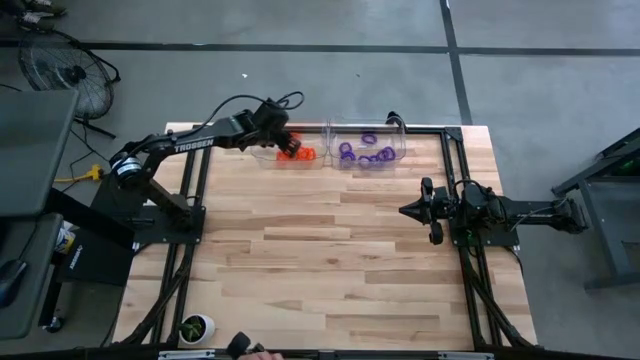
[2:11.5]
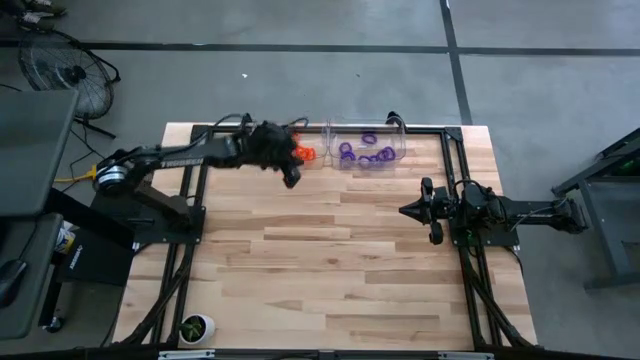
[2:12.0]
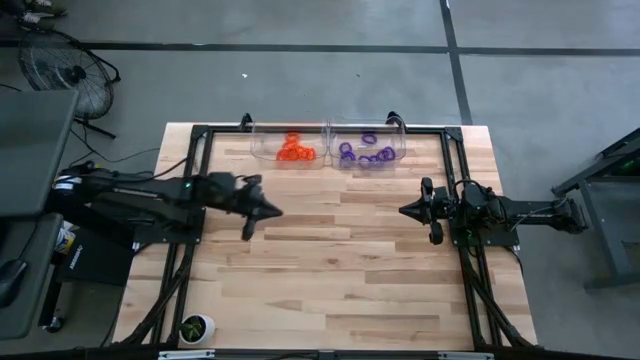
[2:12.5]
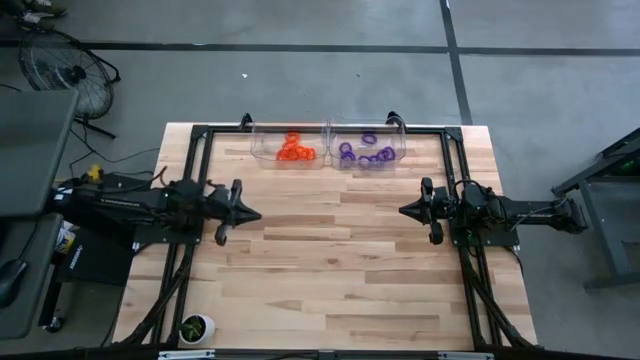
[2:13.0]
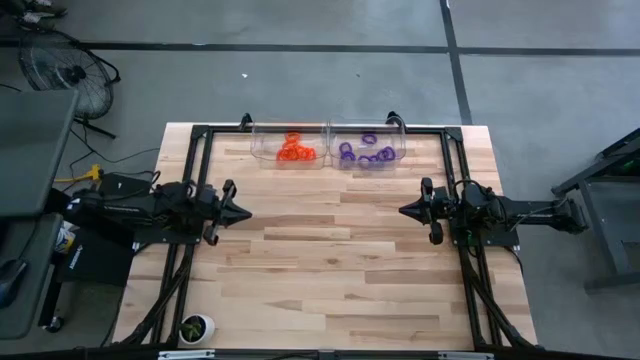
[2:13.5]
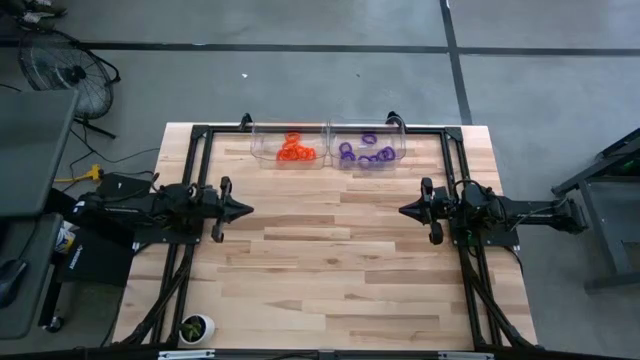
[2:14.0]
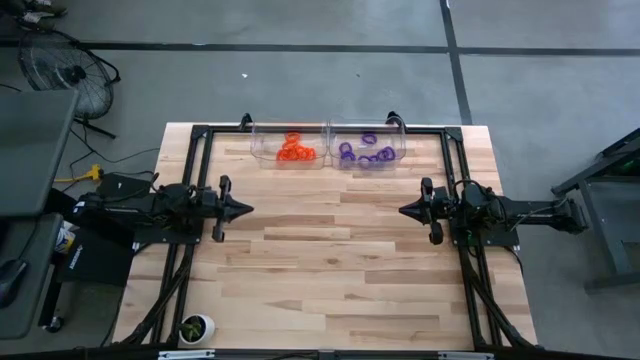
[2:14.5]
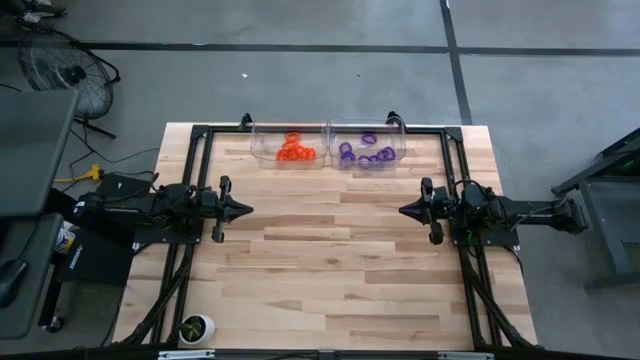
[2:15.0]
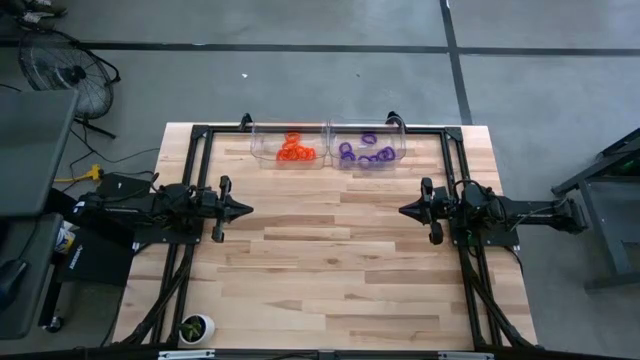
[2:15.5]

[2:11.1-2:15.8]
Task: Sort spring keychains
Return to Home Position

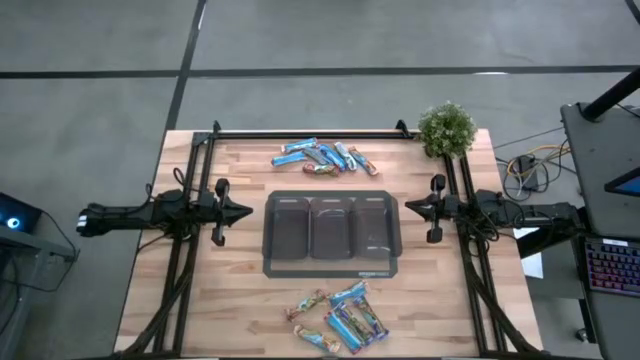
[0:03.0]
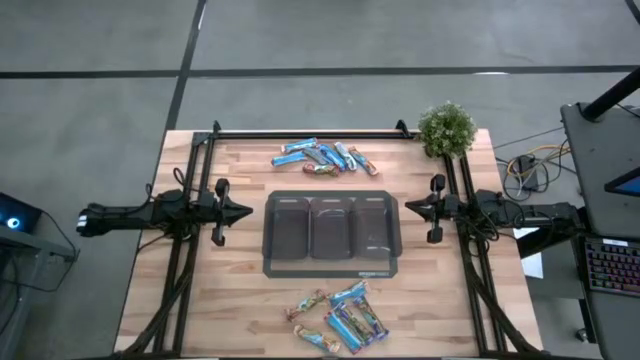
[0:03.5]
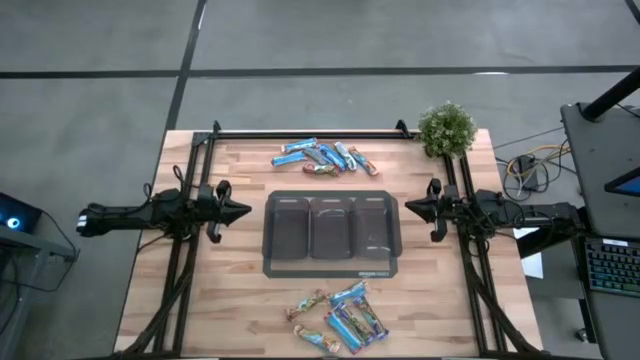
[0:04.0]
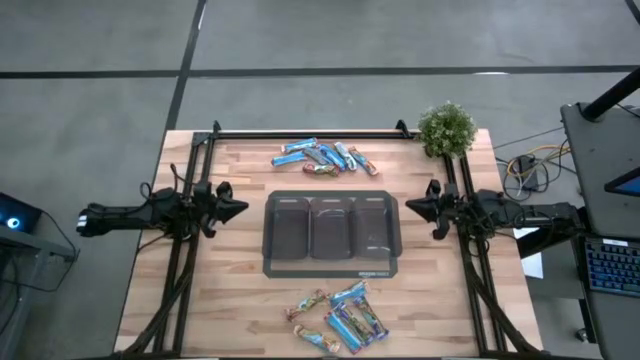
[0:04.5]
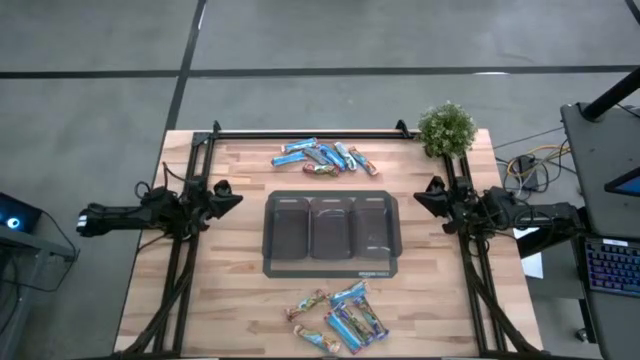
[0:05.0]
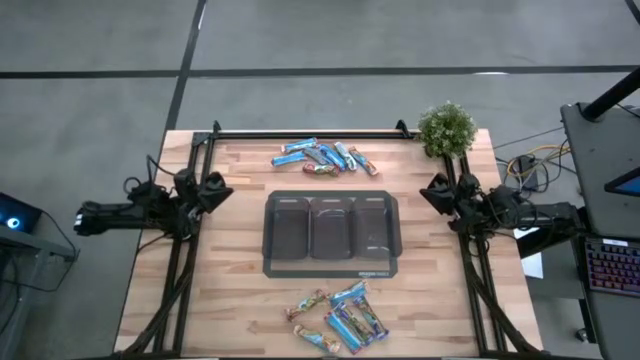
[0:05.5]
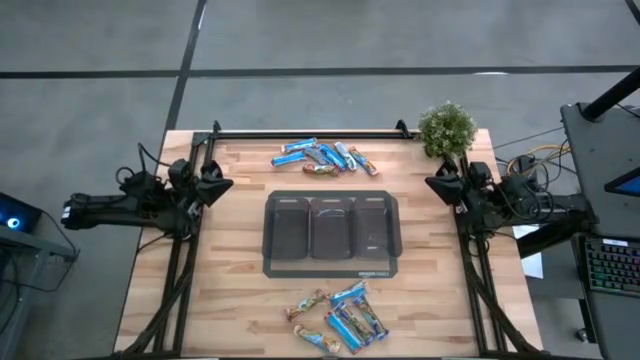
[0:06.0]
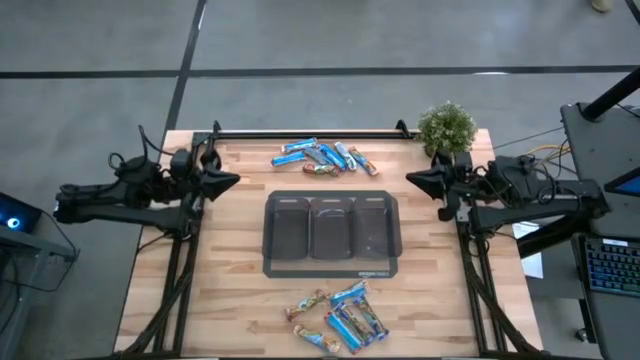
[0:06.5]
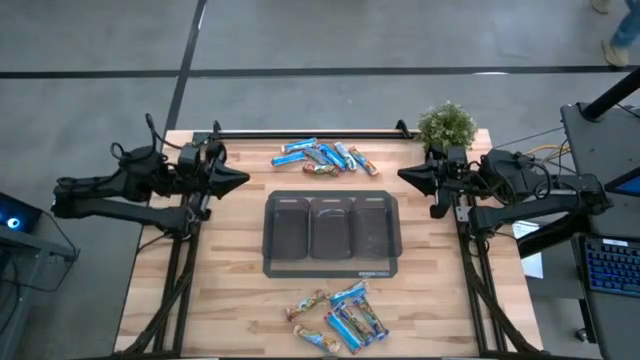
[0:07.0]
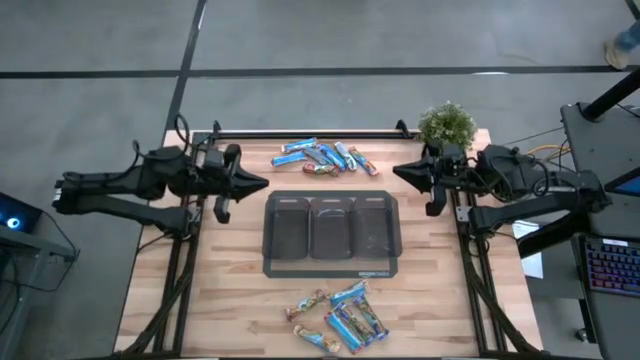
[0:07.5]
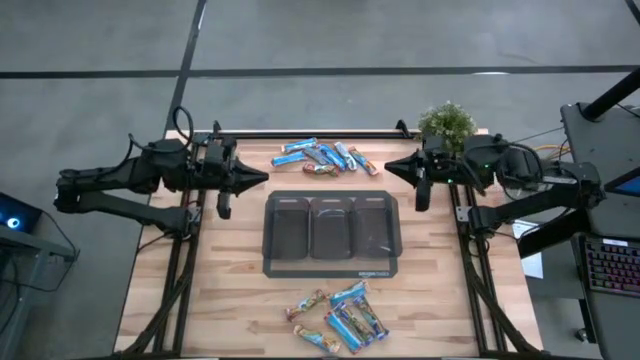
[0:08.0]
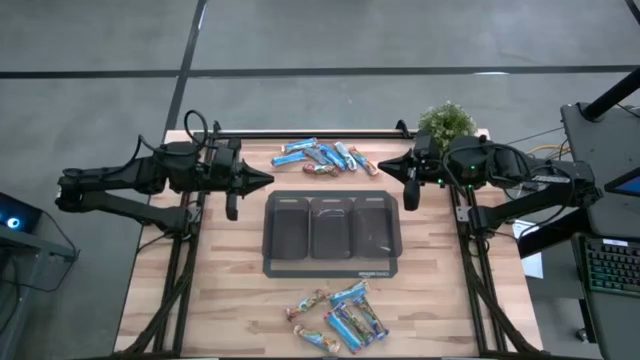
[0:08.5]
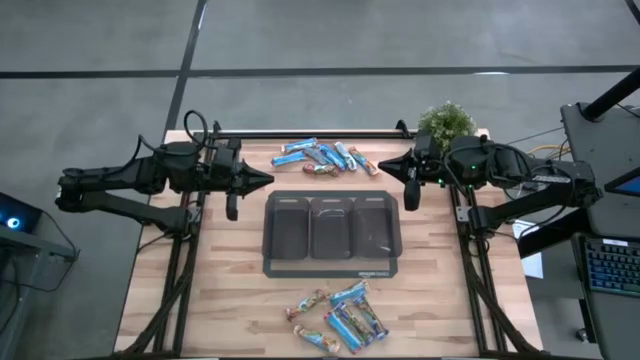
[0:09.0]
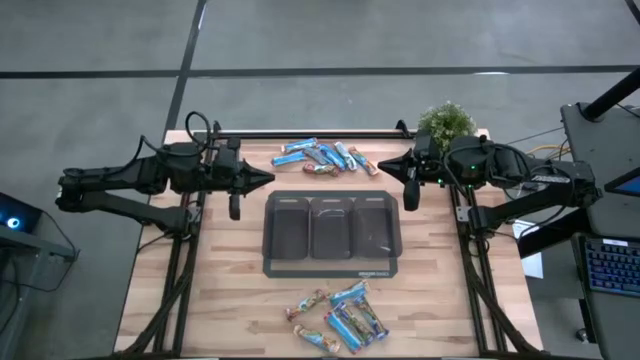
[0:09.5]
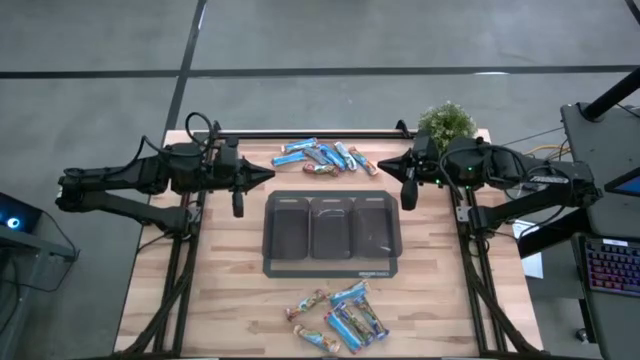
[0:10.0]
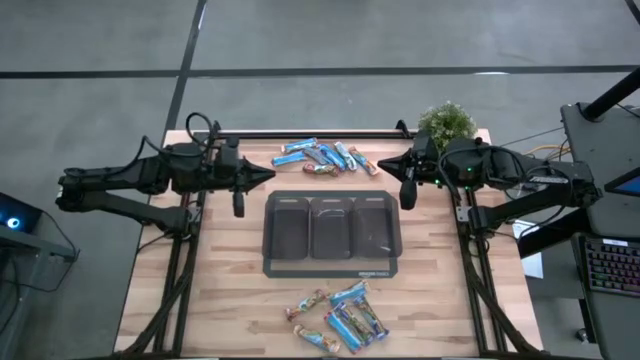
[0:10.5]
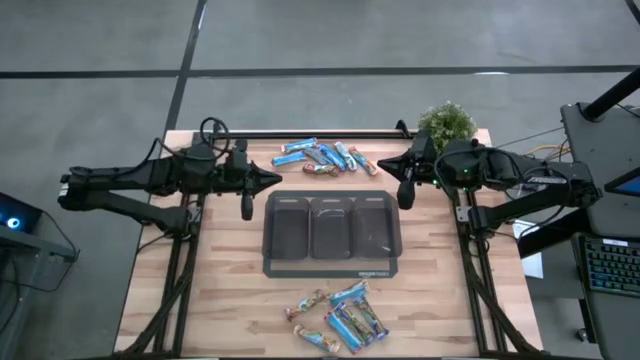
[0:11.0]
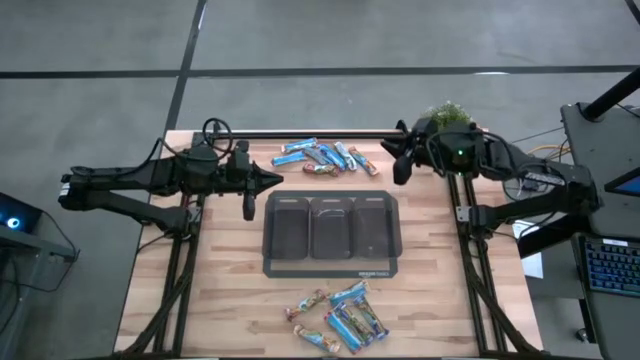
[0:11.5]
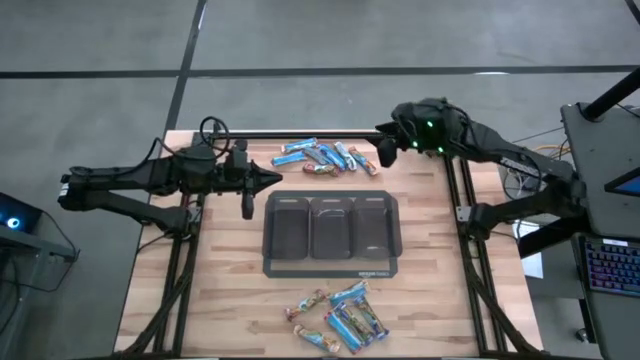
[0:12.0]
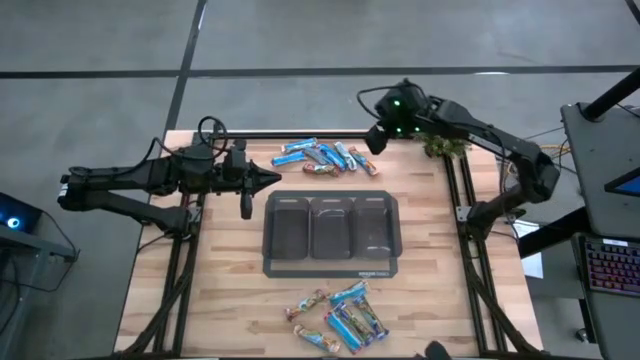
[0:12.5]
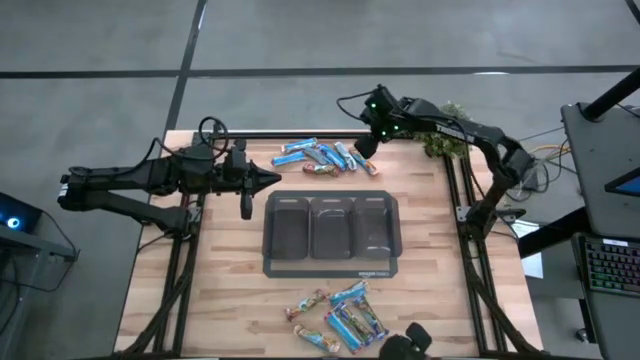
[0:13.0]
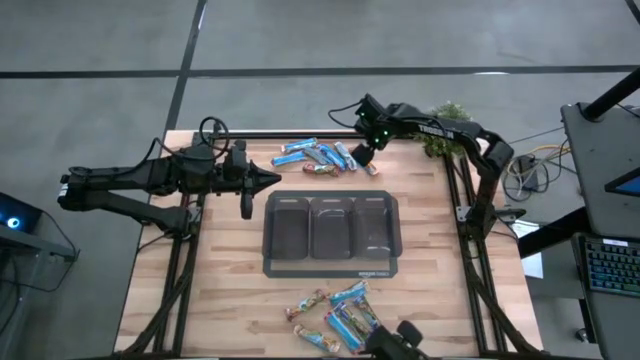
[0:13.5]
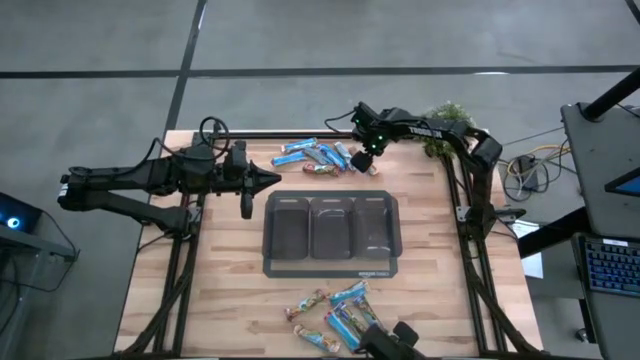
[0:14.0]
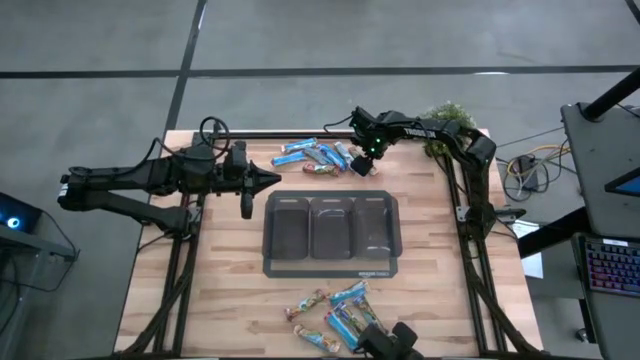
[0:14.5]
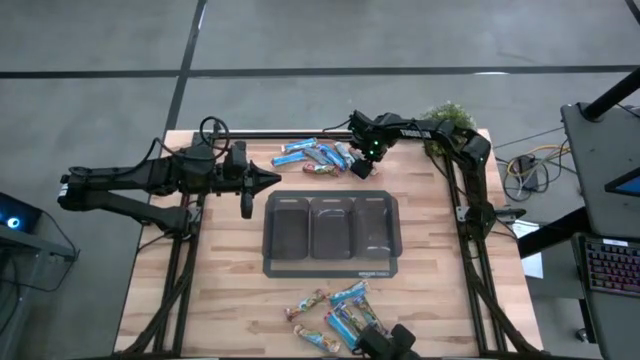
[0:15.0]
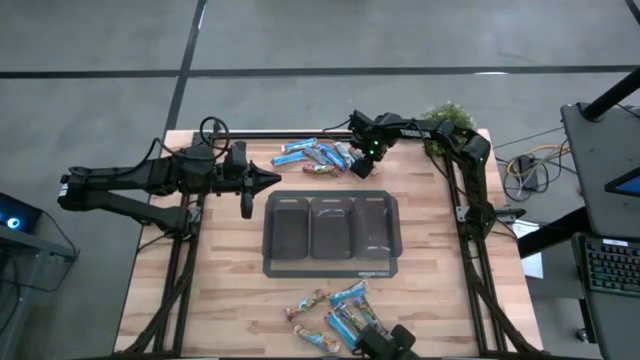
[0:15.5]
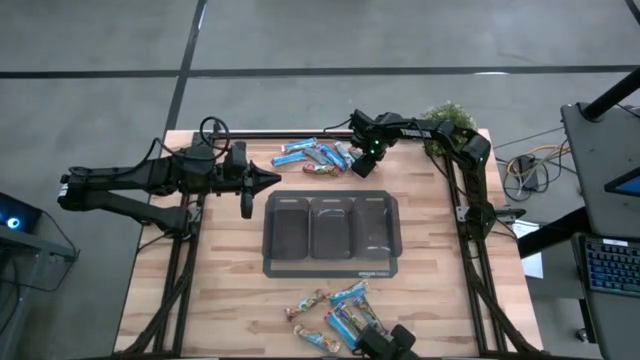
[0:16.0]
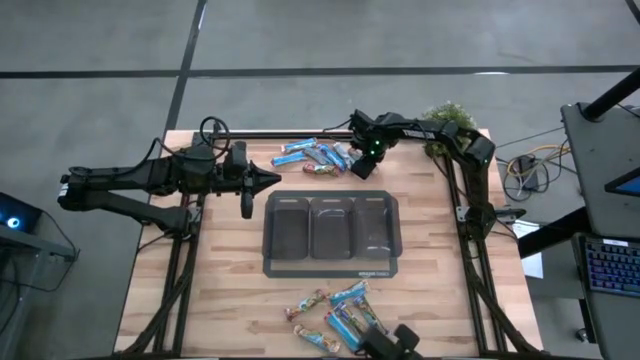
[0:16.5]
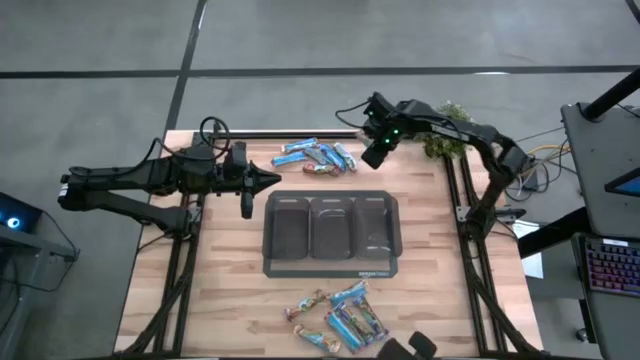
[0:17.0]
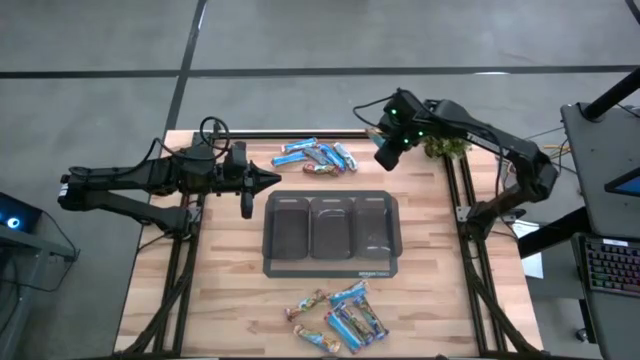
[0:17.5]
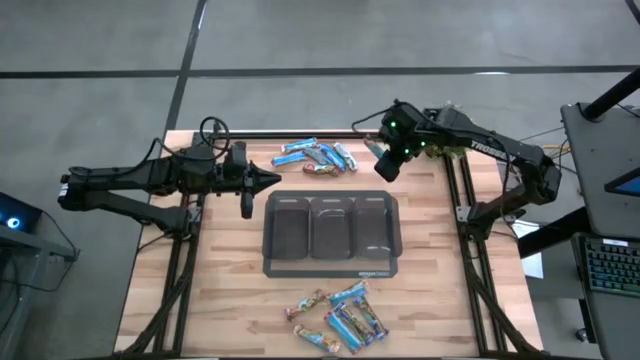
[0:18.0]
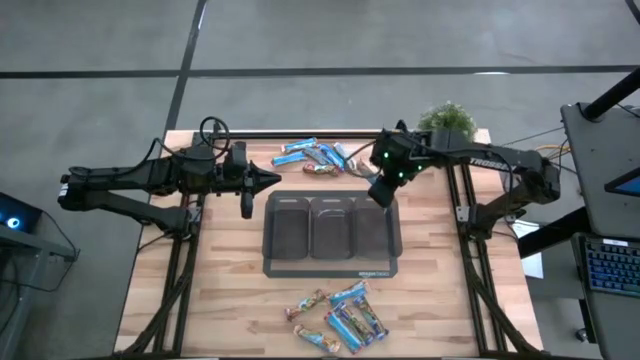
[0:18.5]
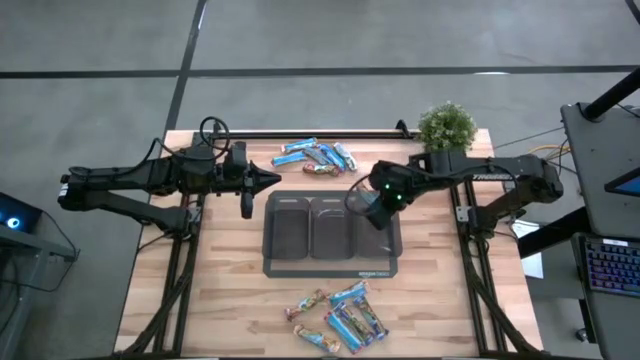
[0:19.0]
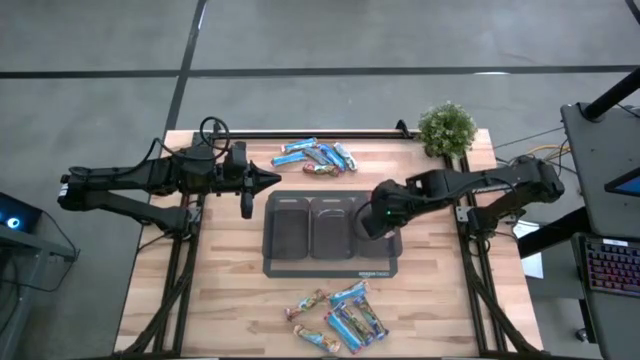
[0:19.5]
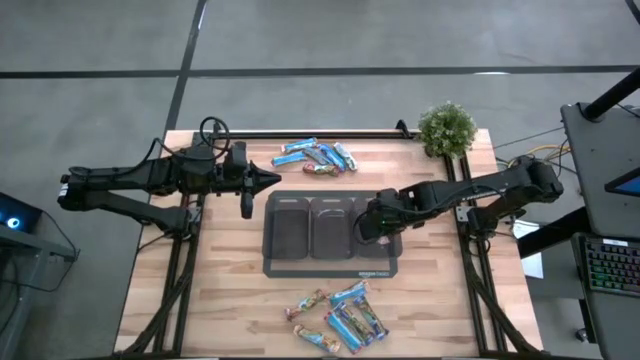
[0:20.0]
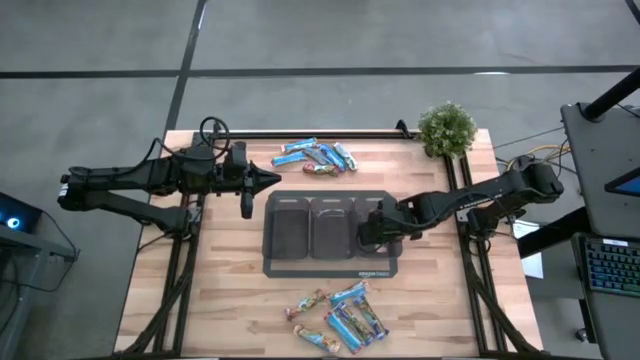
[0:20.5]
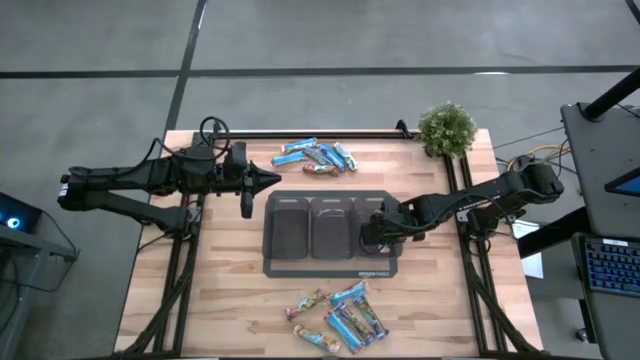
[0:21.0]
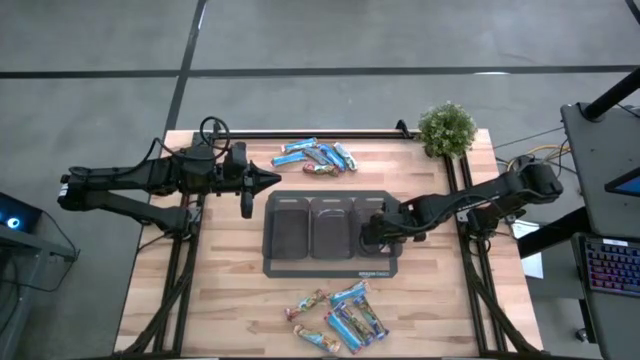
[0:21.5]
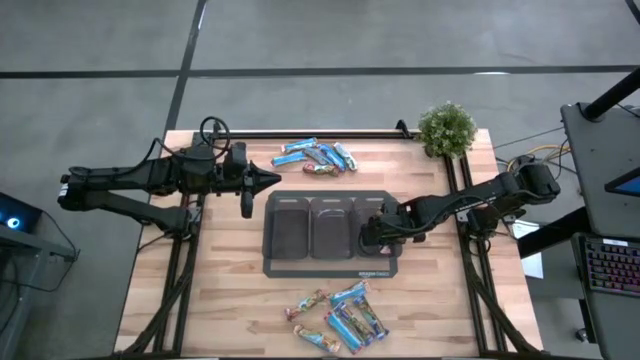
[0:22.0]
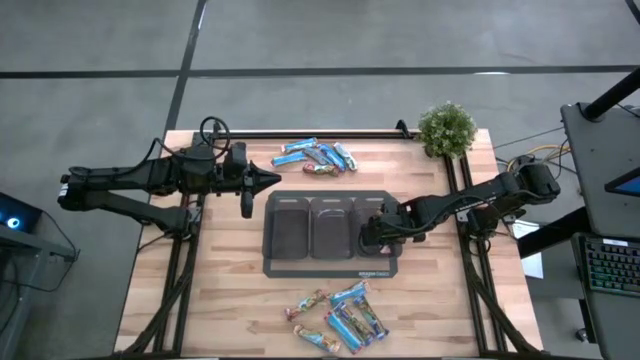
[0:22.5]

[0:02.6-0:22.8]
Task: Pick and place Granola Bars by type
Put the yellow granola bar into the right black bin
